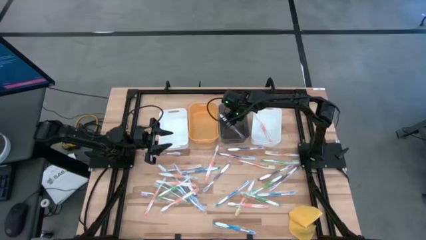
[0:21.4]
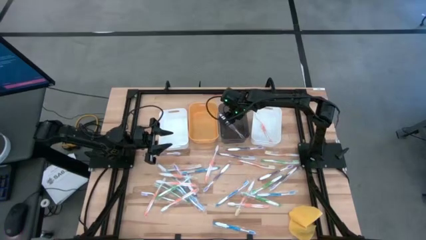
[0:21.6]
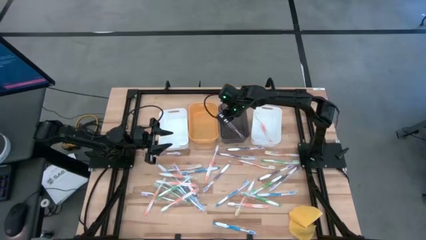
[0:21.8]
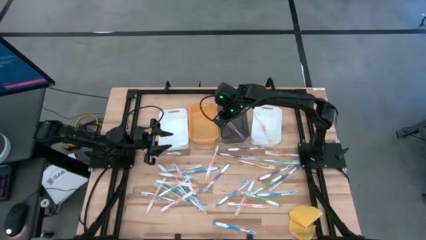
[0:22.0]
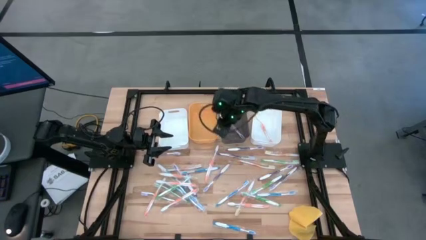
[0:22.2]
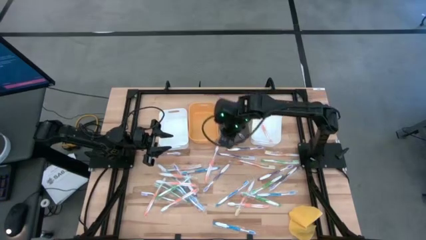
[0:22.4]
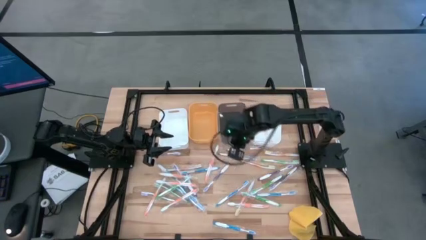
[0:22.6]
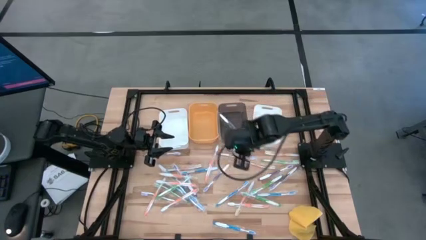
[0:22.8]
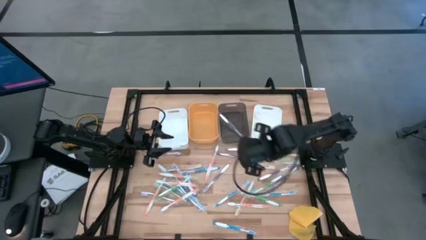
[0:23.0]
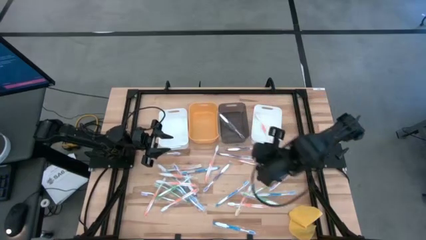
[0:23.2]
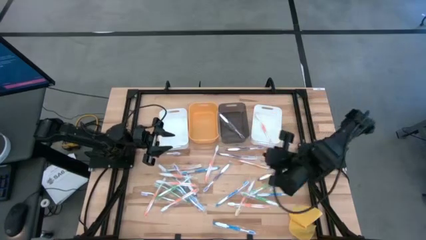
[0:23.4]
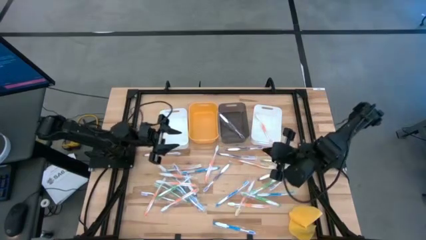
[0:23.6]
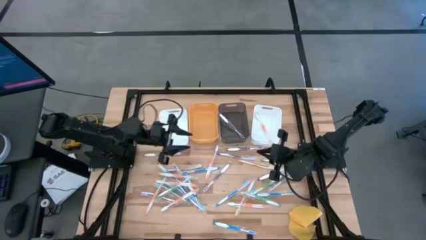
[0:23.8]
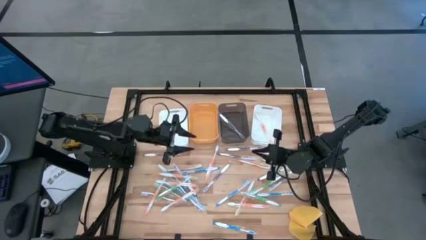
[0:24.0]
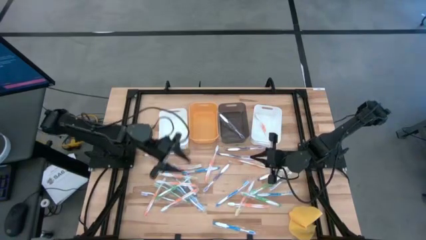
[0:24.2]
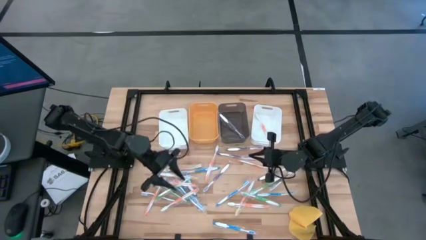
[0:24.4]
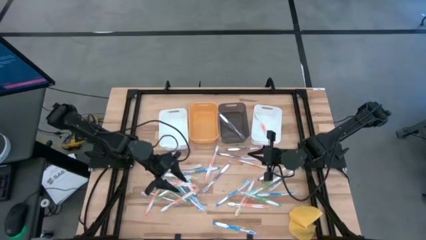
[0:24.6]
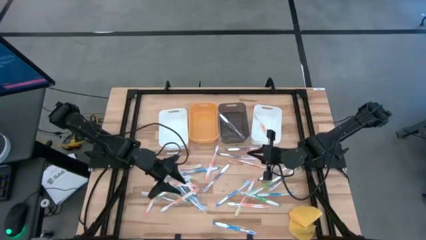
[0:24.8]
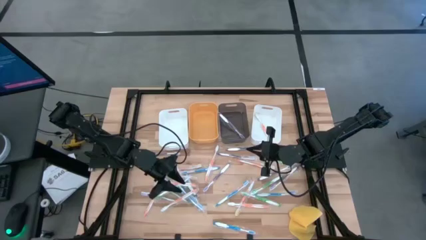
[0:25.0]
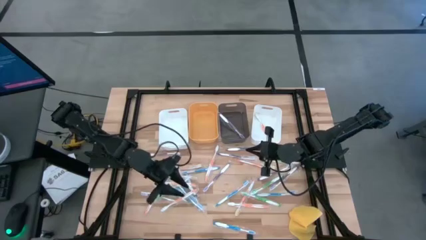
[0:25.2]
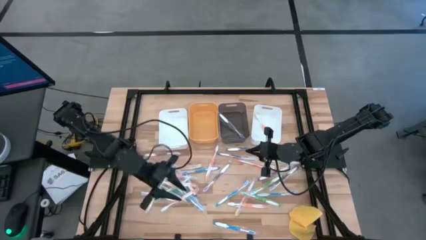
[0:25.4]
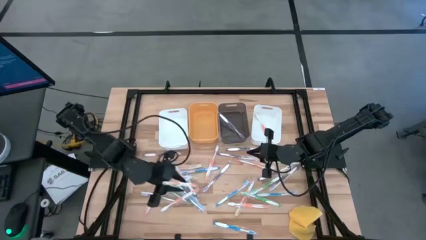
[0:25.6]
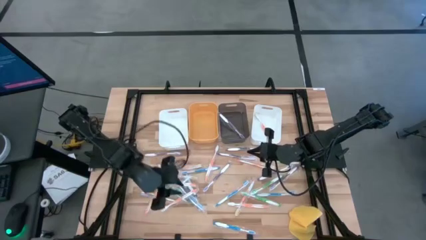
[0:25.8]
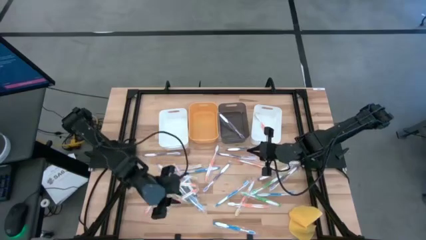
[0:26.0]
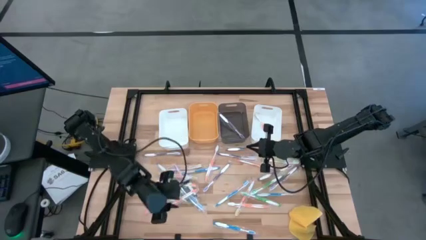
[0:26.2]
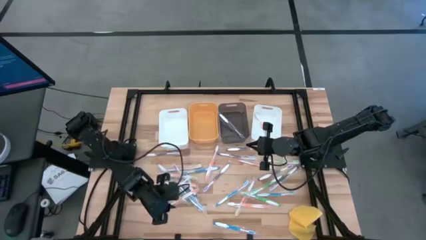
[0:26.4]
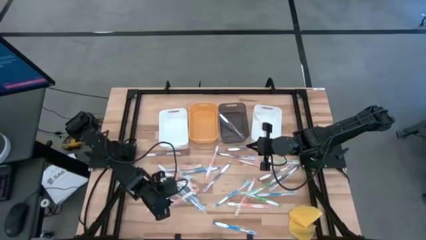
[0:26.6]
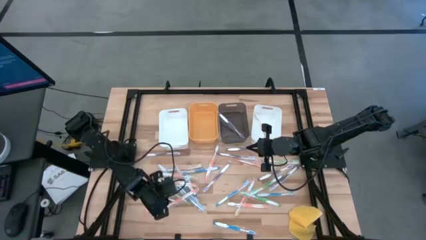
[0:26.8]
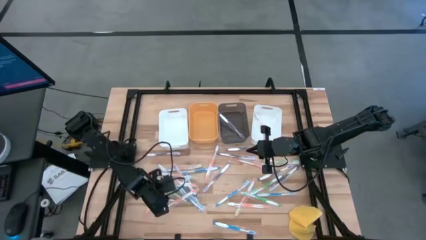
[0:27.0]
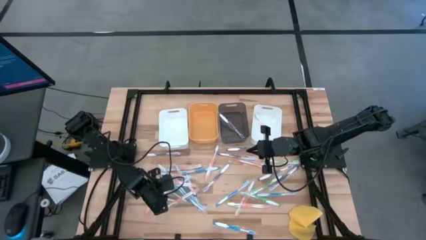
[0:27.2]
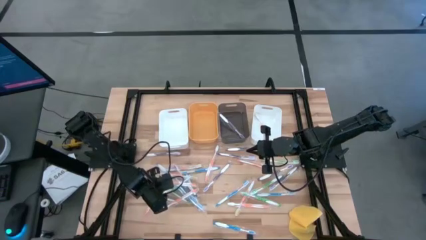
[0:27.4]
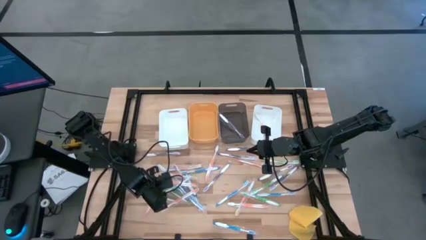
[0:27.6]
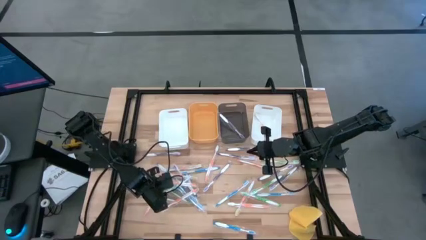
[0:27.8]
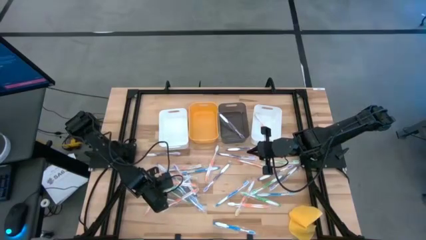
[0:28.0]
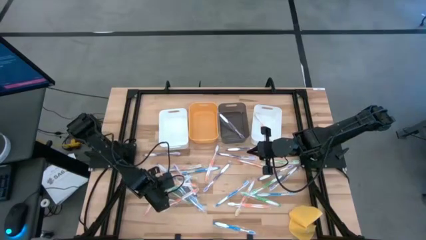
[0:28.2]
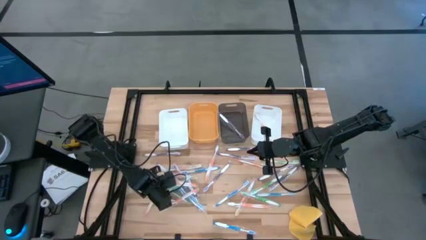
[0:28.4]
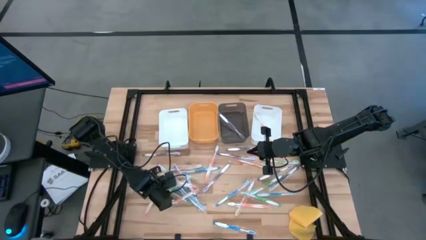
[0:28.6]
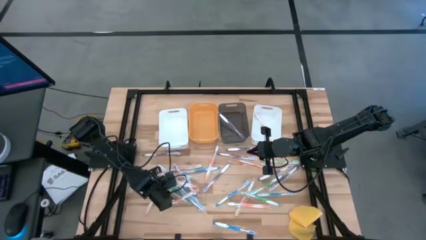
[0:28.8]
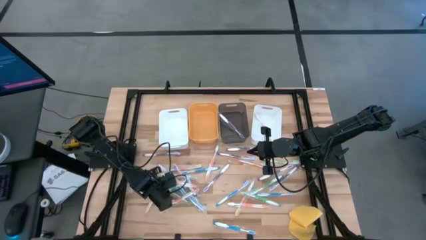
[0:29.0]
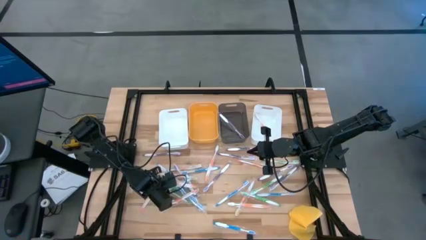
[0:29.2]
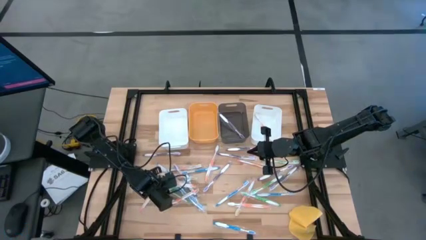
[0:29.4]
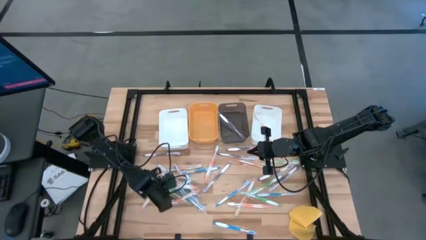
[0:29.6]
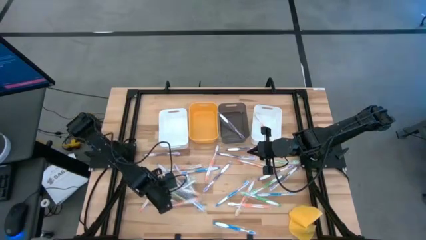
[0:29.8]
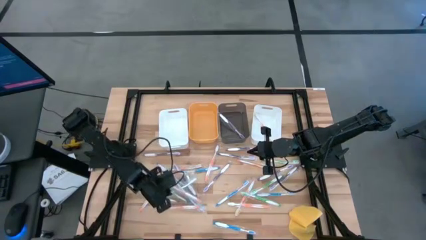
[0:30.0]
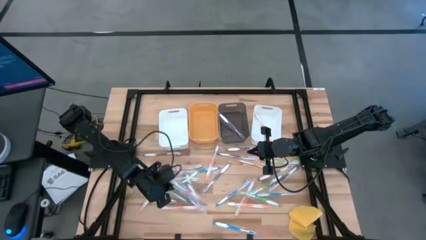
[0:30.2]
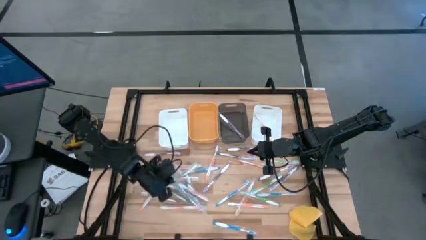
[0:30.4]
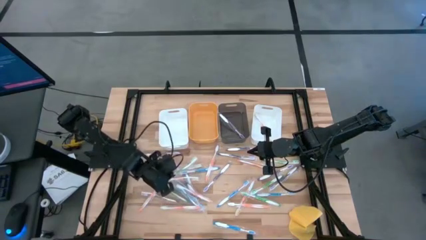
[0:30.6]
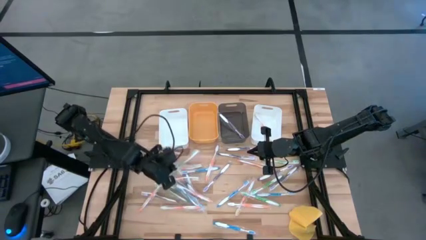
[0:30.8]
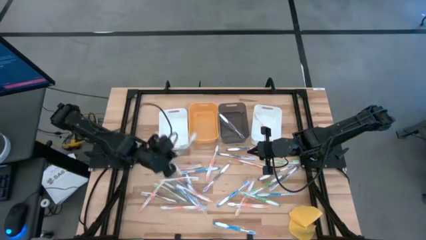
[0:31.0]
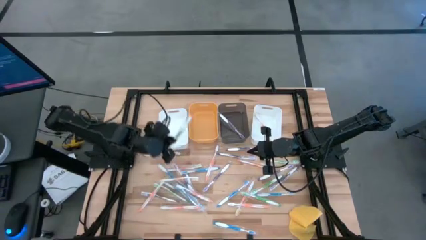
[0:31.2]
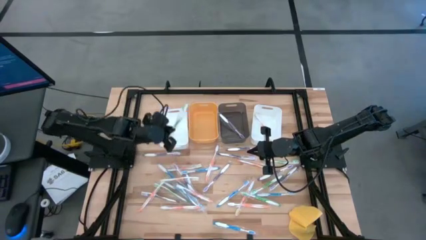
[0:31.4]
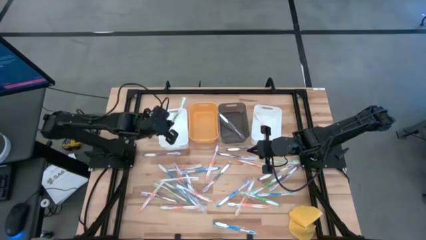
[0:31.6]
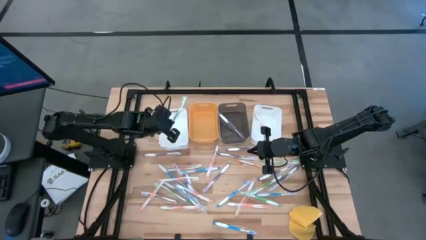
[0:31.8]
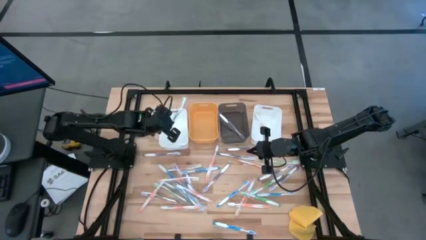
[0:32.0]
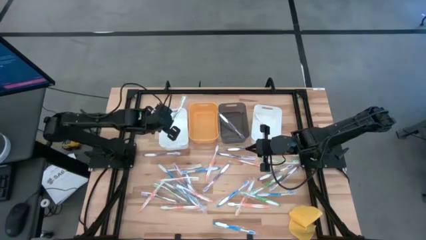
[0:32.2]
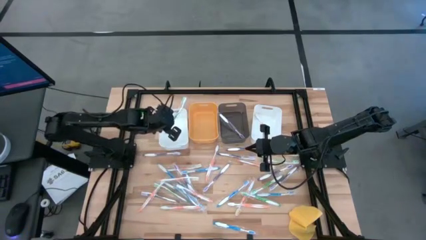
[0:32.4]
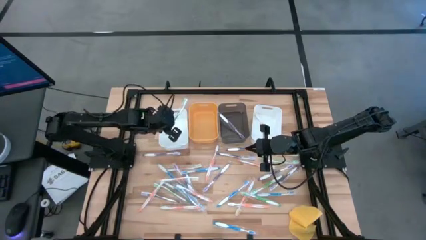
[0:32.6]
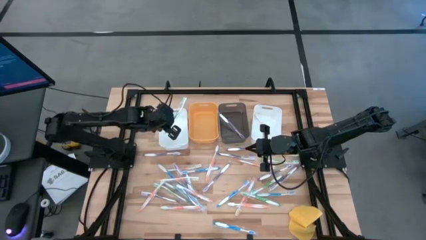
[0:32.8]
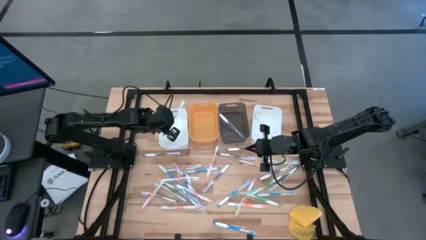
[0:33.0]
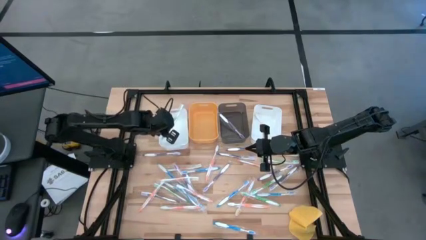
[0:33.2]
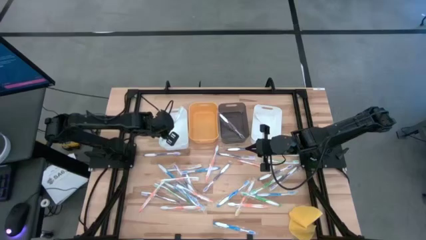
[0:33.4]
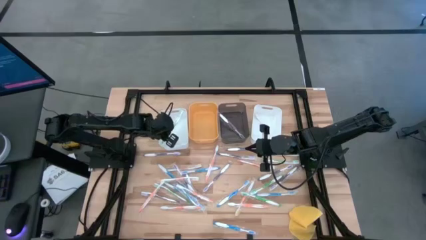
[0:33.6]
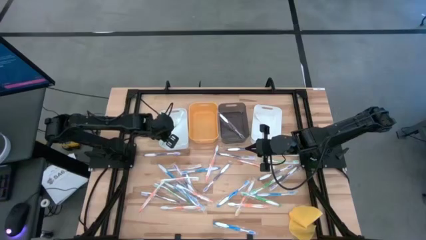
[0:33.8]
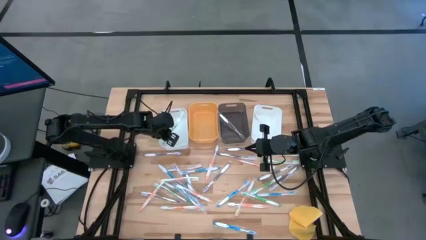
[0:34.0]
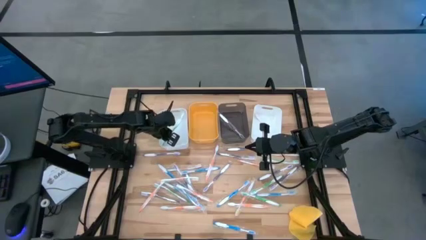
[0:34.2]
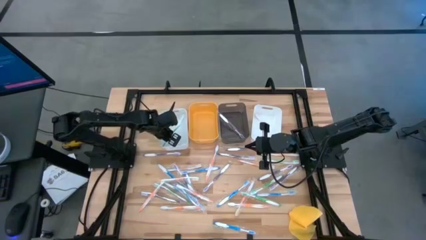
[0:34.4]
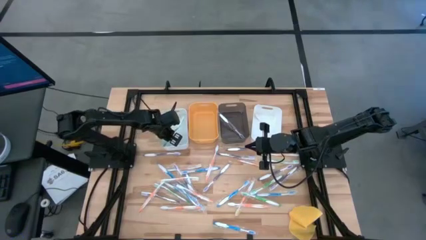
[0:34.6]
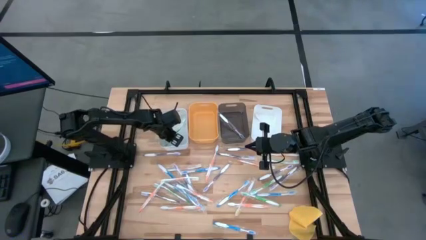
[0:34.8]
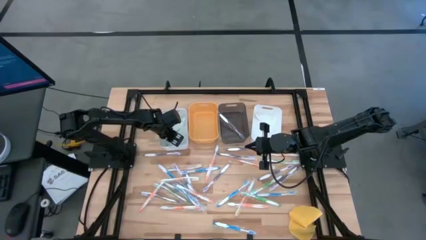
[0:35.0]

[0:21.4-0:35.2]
Task: Pick & Place Toothbrushes
Put the green toothbrush into the left white bin
